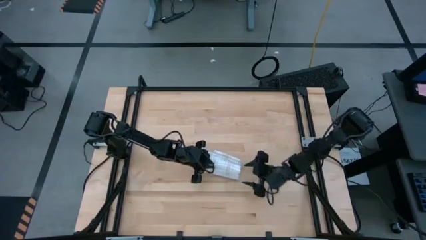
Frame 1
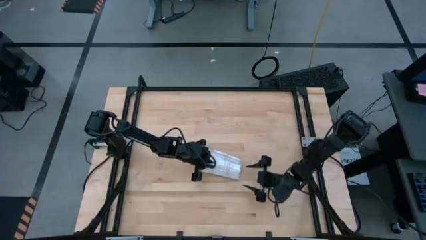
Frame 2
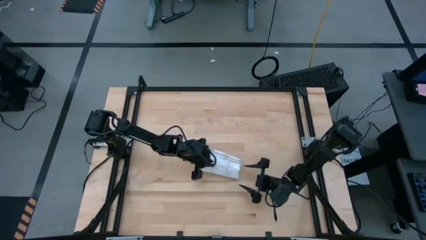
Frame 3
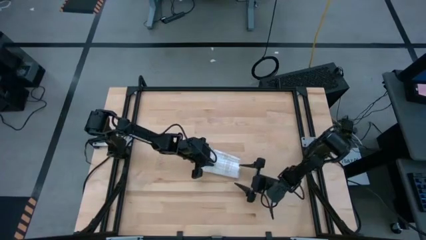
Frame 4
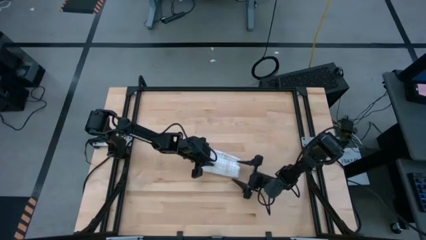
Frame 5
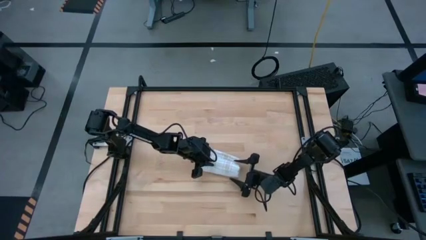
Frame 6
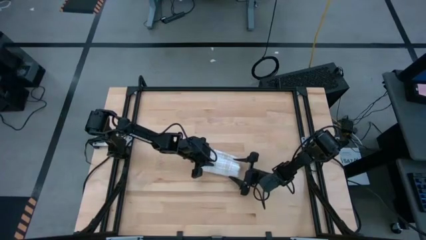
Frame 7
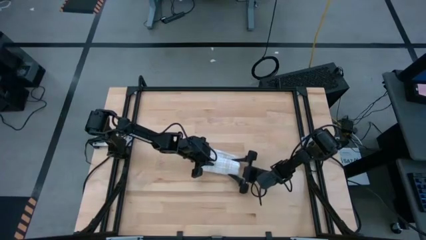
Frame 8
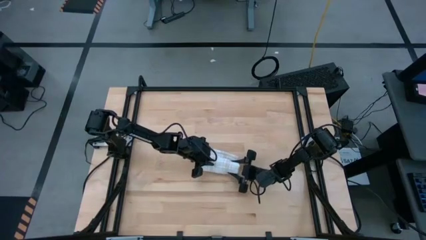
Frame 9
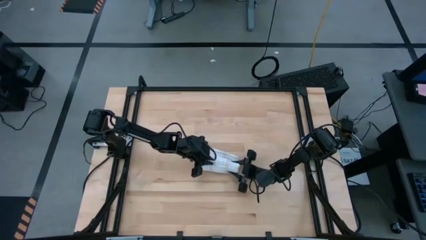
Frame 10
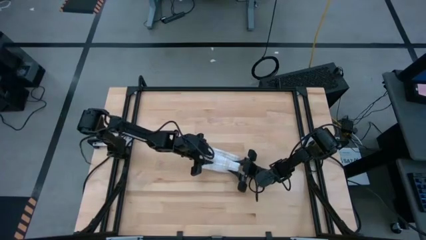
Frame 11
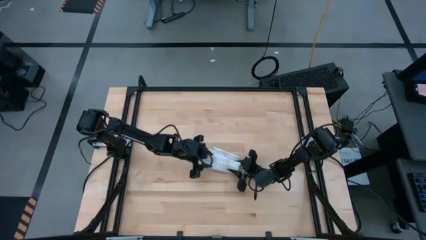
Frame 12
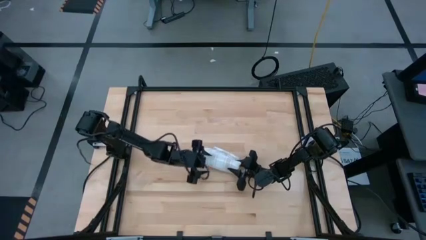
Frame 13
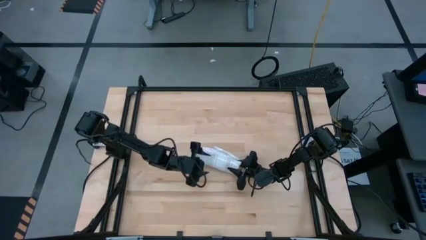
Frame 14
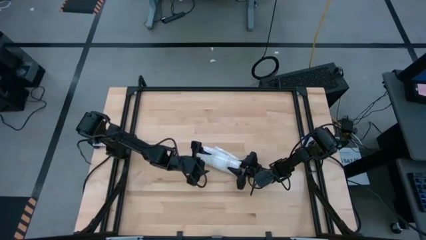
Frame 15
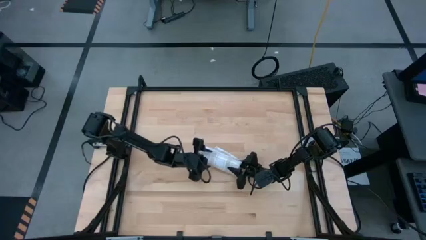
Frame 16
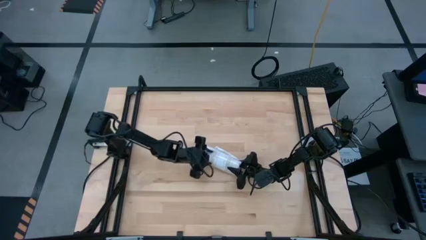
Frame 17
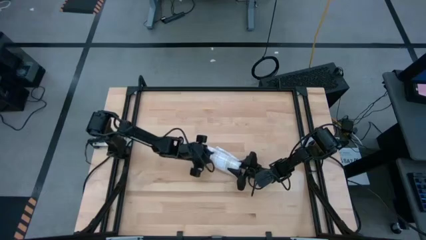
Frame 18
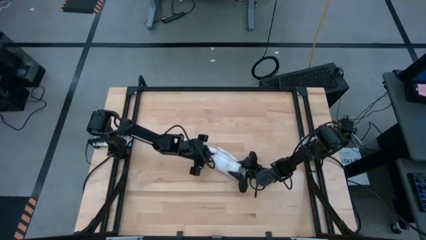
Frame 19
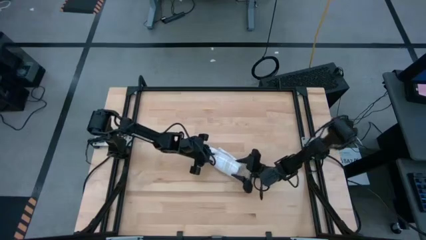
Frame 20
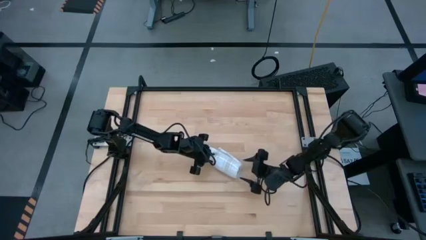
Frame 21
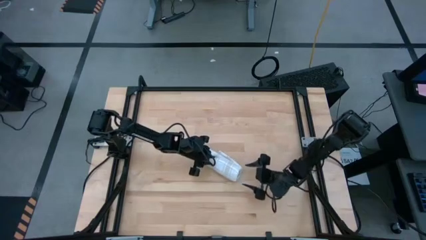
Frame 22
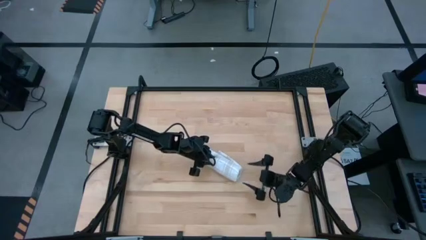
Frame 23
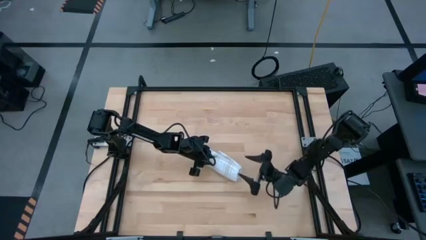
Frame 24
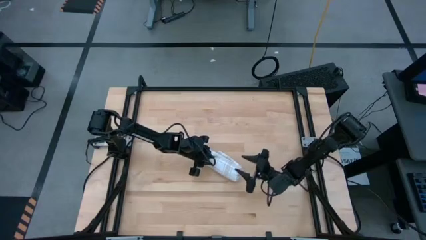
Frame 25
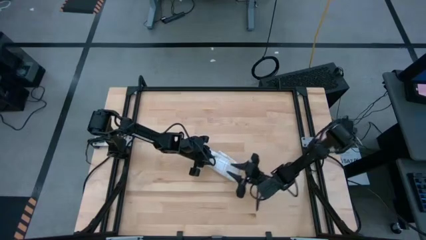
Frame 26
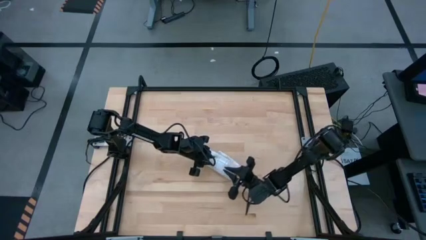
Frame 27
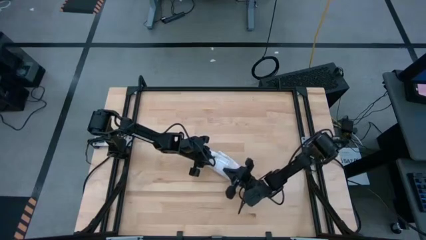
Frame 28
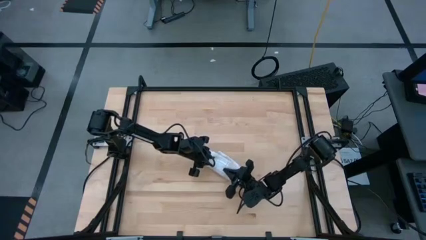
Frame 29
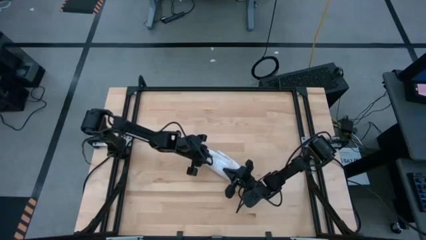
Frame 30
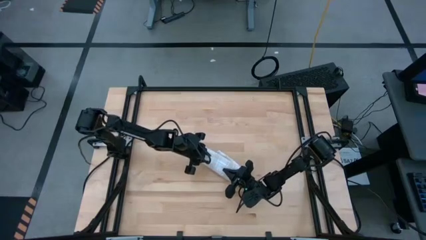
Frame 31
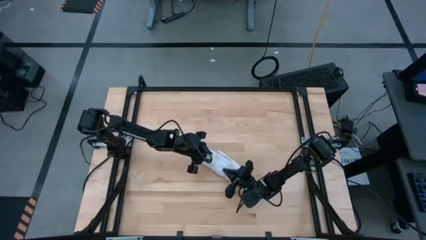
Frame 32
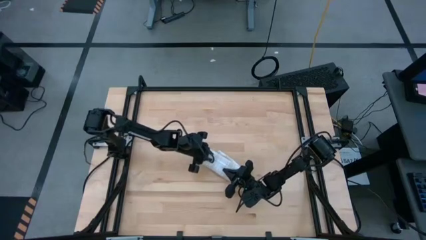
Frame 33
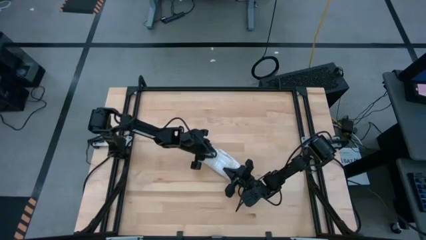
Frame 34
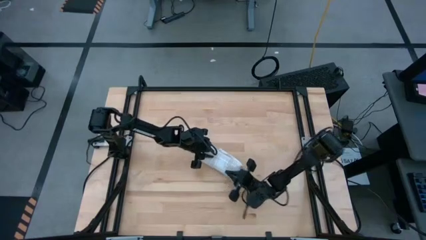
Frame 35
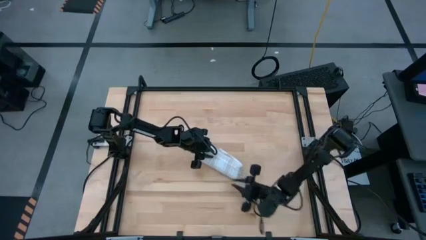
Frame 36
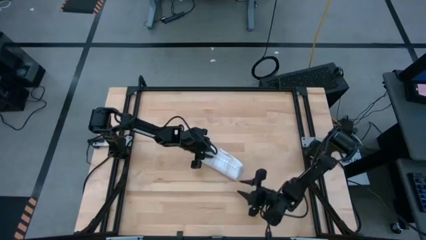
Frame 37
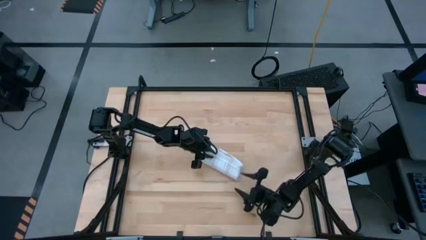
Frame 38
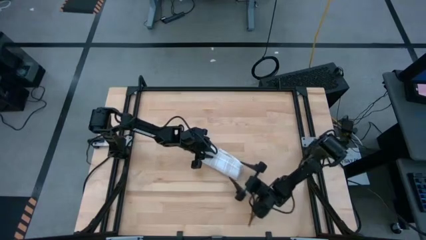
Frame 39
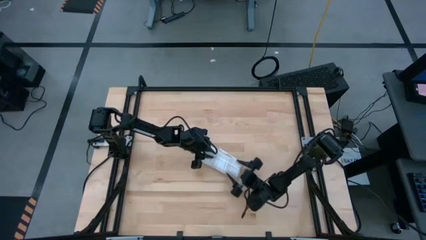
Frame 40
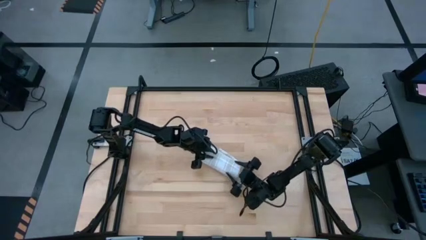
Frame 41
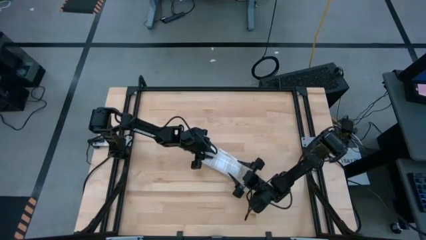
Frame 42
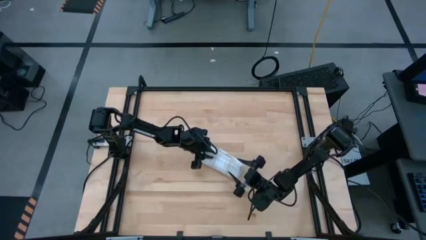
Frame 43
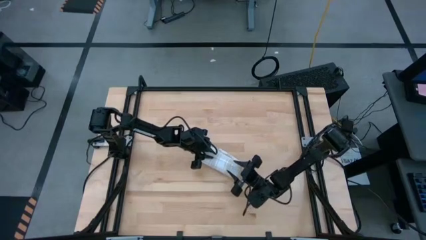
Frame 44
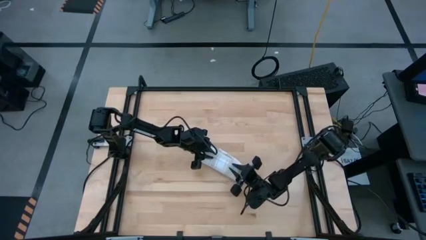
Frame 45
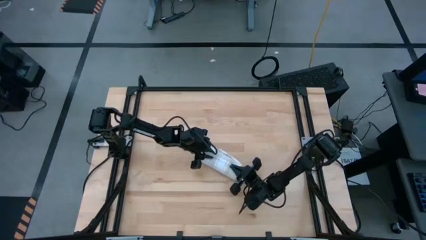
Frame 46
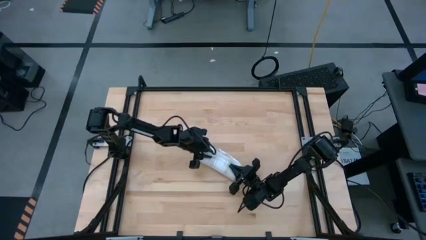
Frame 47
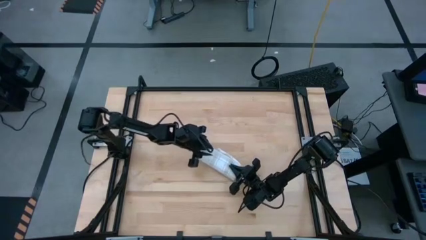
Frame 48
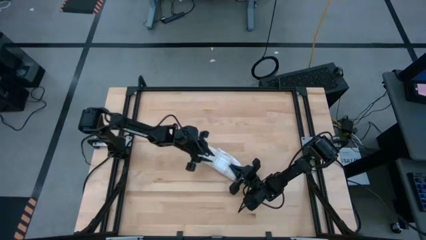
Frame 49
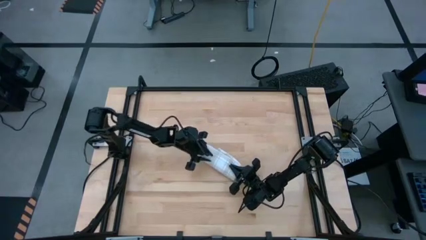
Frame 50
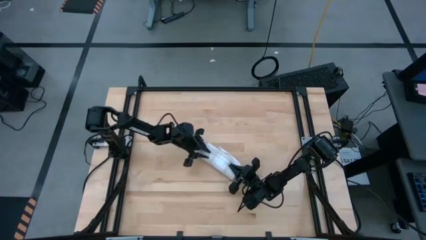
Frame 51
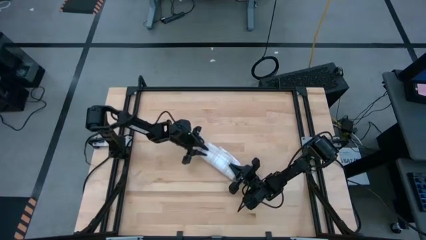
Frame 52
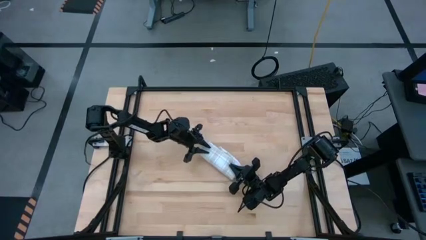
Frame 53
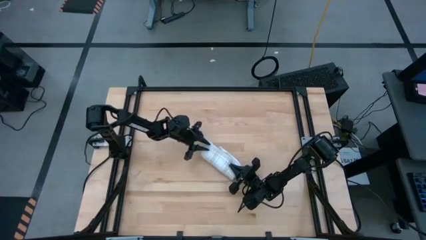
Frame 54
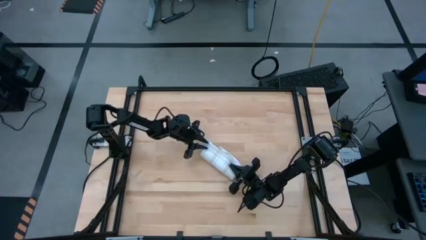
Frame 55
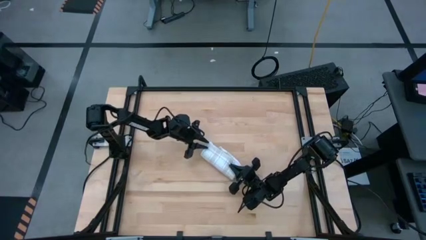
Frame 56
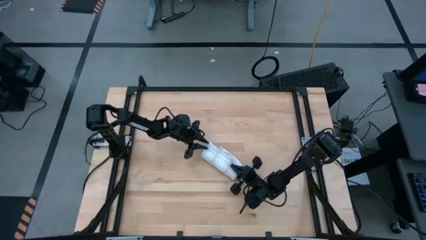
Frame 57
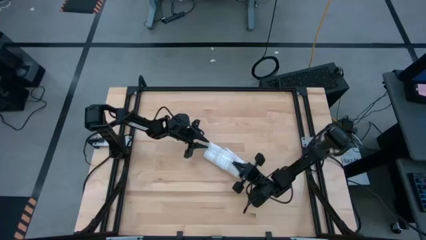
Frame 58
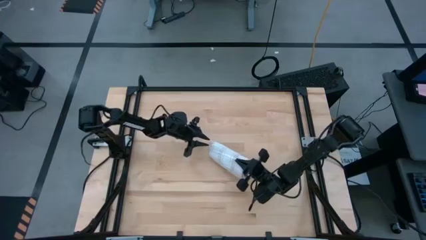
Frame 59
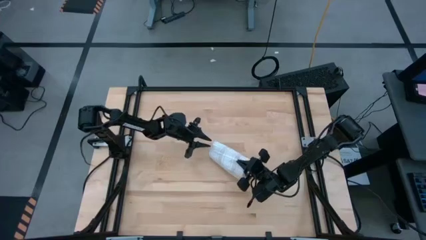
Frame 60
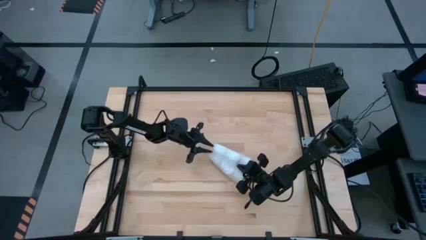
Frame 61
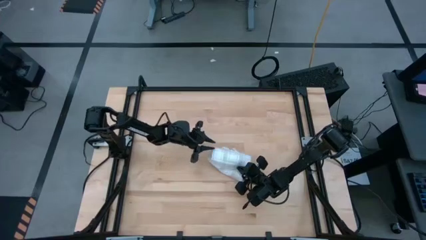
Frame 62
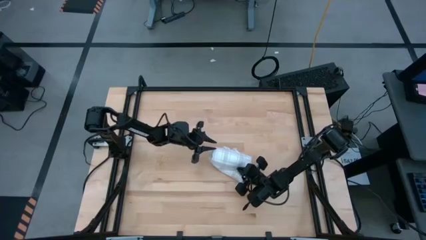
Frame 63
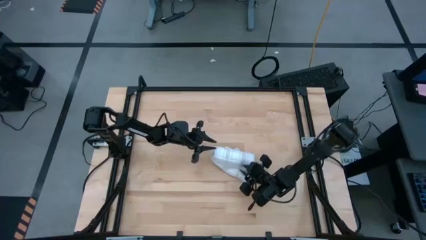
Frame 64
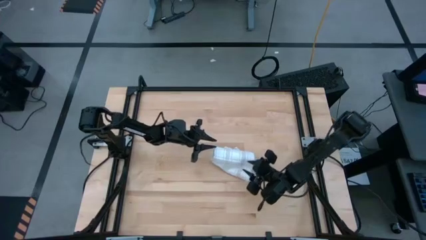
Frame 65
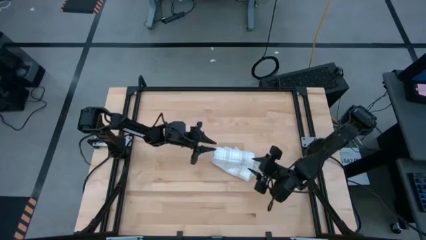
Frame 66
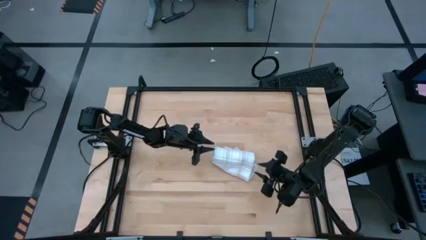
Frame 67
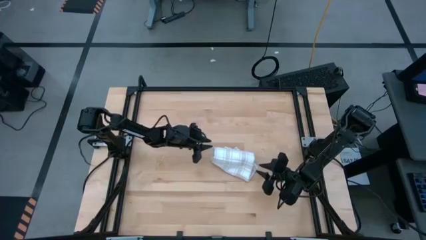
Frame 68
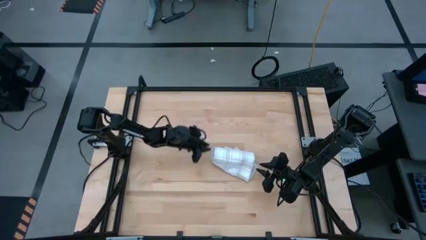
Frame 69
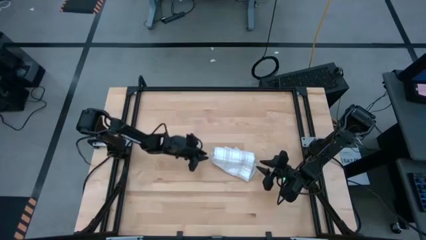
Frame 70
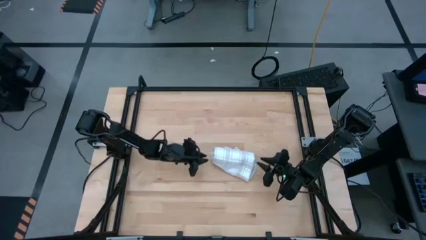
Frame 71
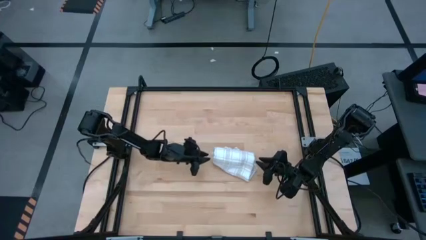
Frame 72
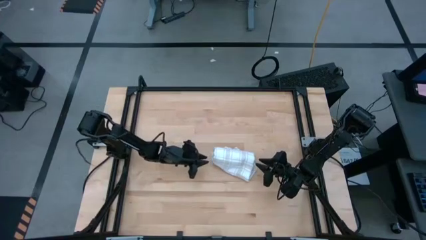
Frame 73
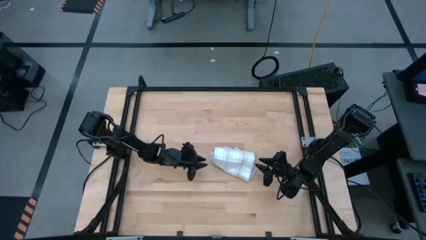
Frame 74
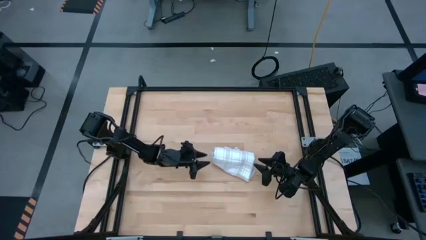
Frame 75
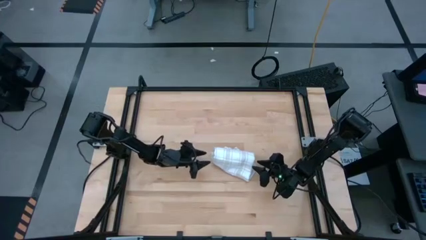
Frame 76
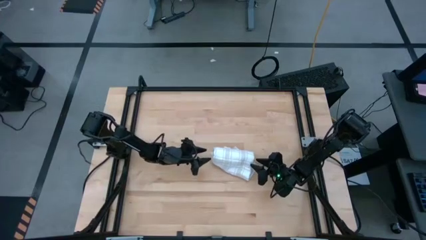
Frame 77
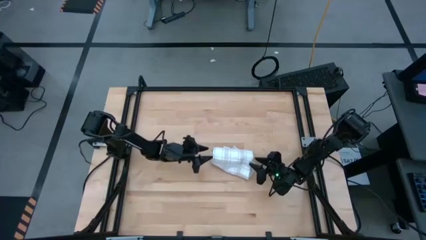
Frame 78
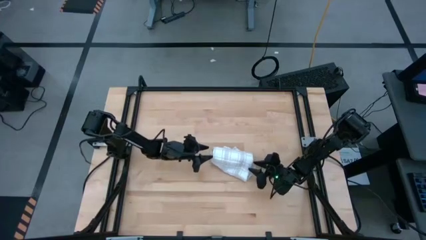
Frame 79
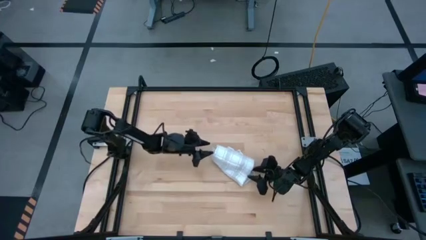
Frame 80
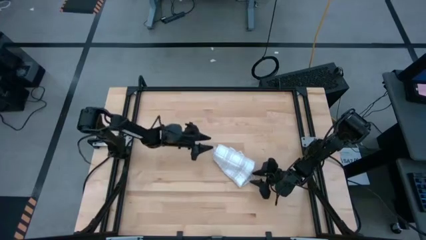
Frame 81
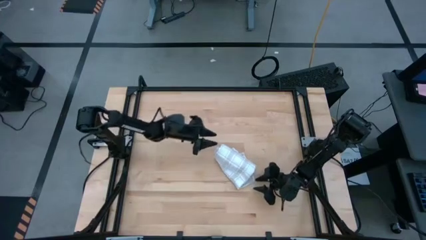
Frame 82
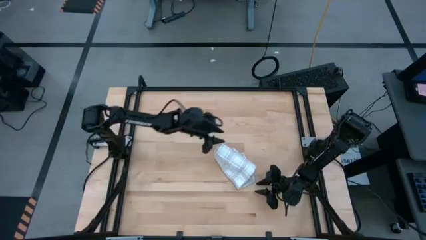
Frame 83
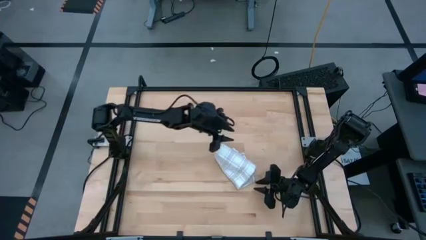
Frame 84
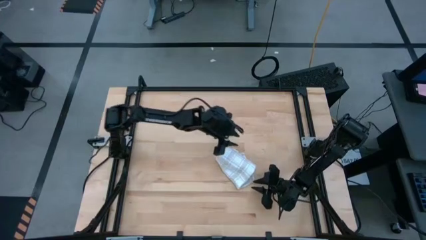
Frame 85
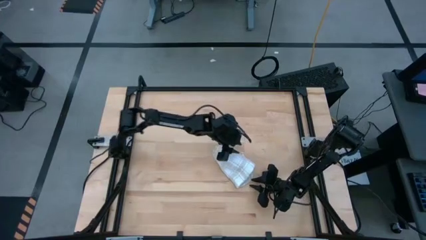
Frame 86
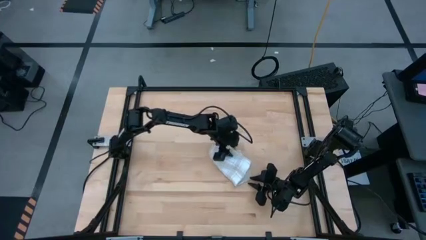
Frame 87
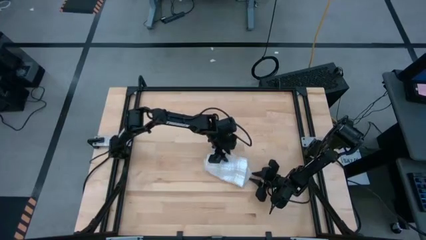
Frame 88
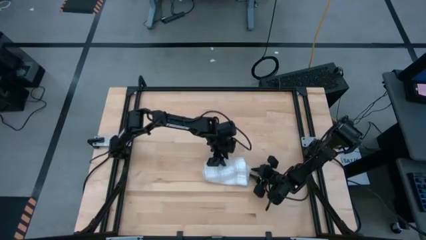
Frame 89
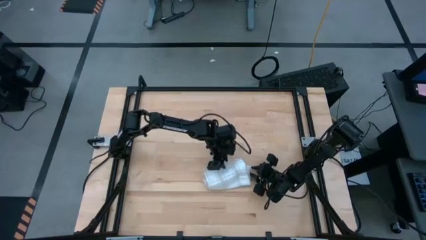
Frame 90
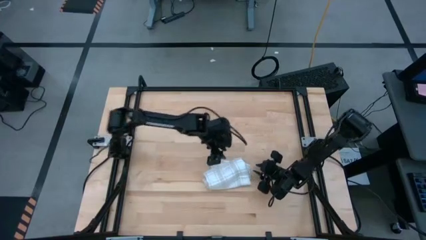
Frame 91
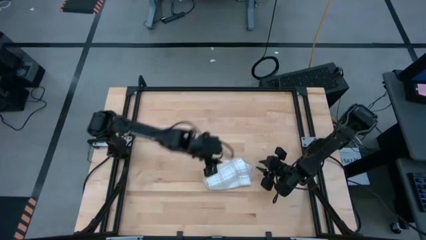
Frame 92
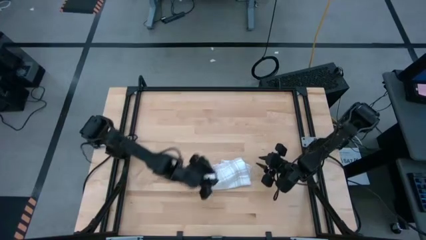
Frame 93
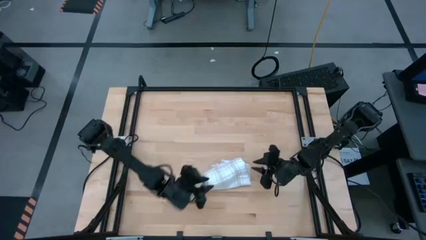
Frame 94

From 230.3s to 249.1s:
Task: Roll towel
Roll the white kitchen towel
